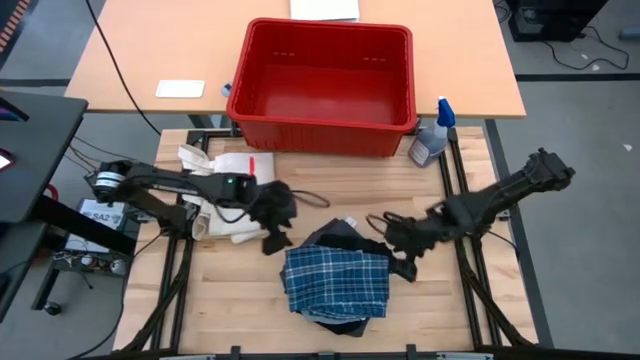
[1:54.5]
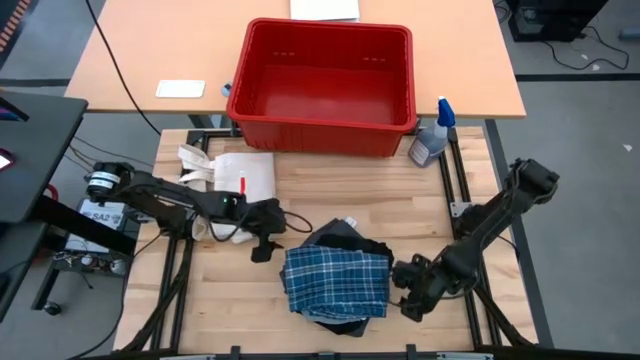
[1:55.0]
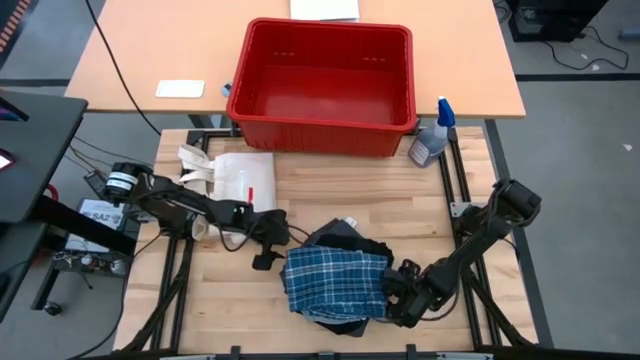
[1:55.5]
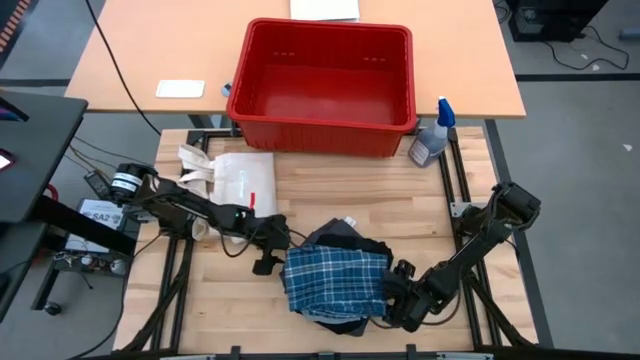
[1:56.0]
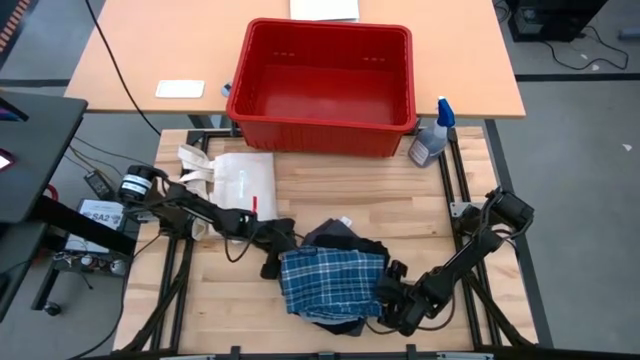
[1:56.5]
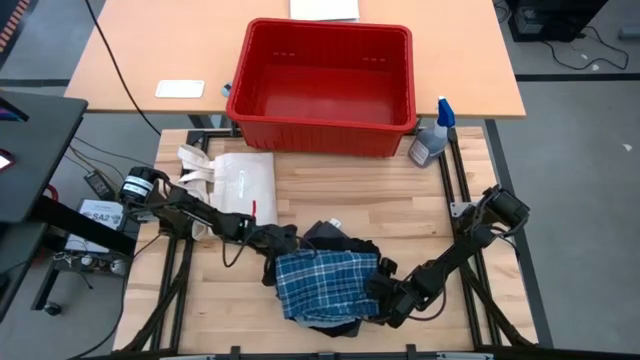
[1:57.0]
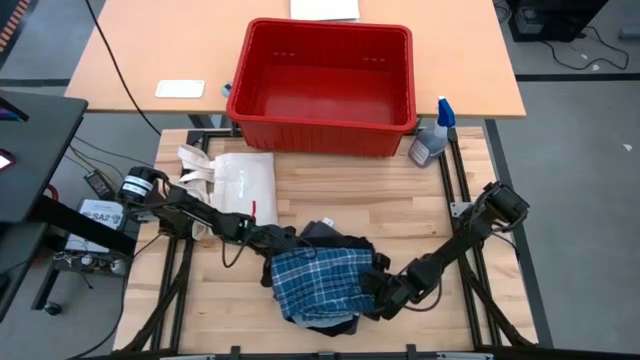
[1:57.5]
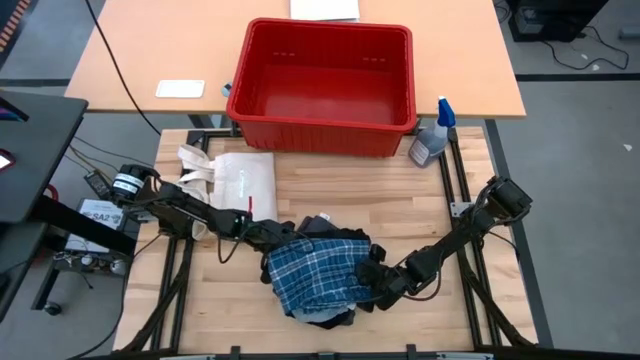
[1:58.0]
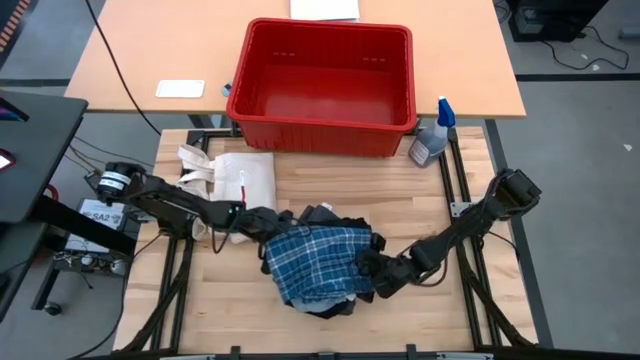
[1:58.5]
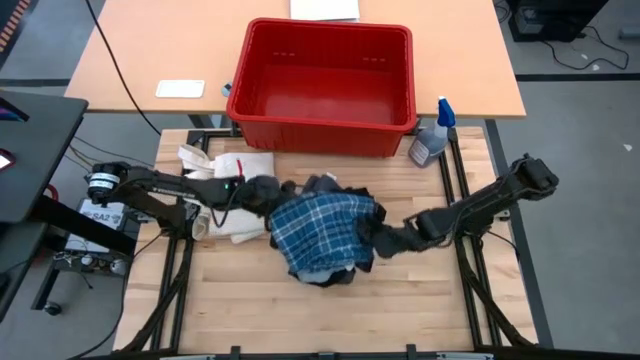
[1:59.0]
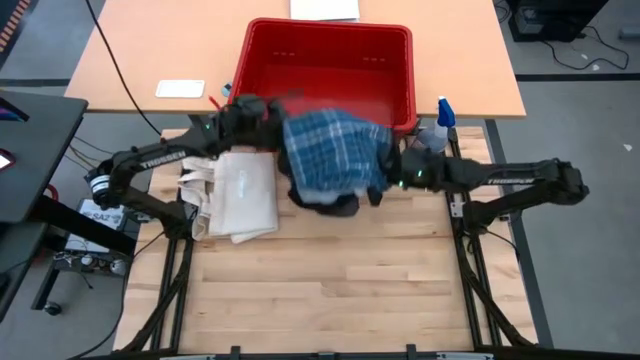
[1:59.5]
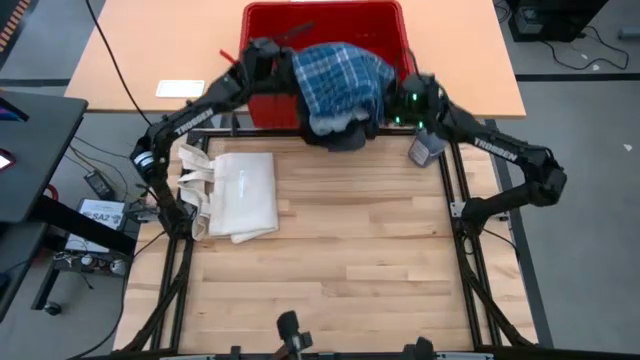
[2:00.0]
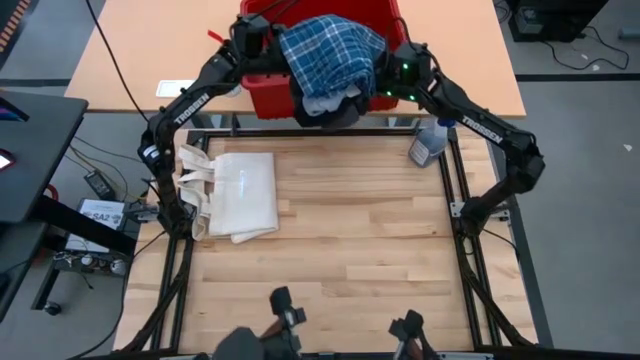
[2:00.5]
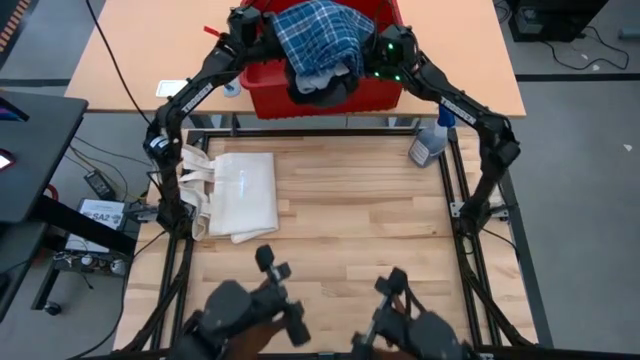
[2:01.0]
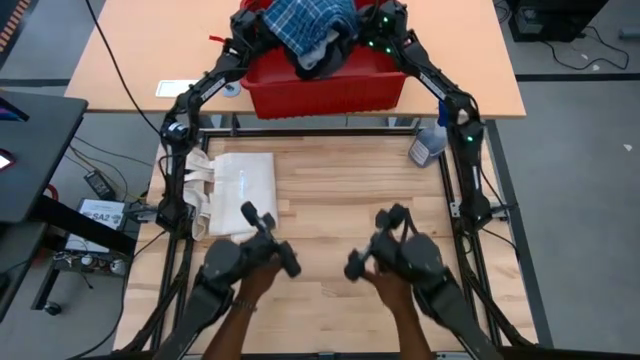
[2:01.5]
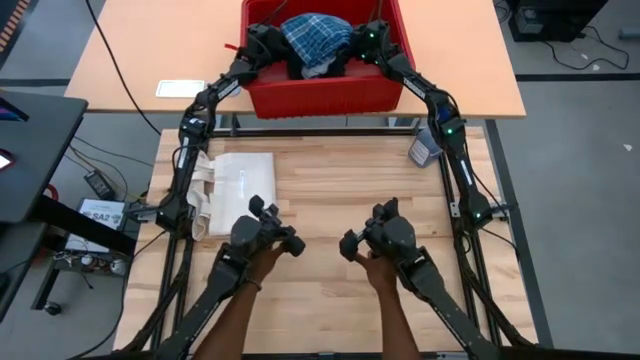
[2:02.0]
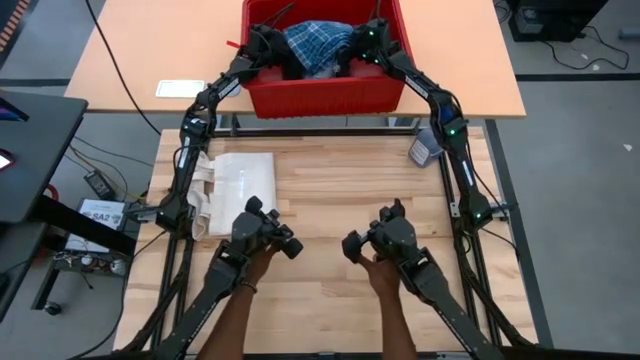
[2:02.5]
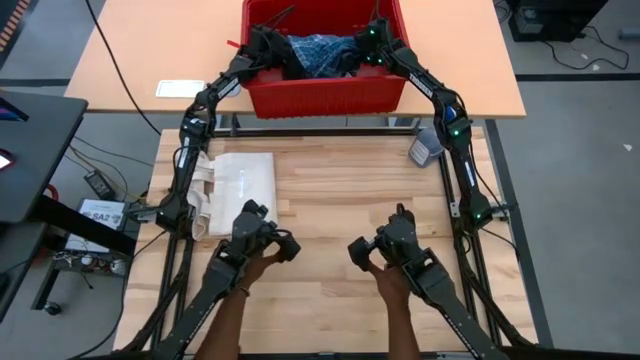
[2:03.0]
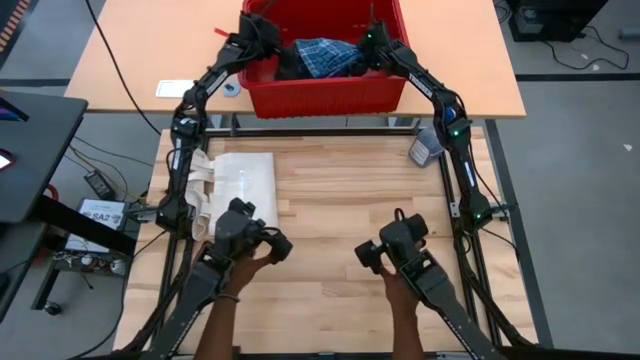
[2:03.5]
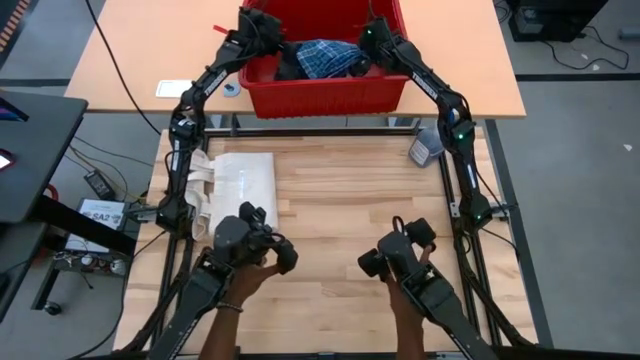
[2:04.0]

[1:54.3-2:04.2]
Task: Sort clothes
Put the stack of clothes into the red bin

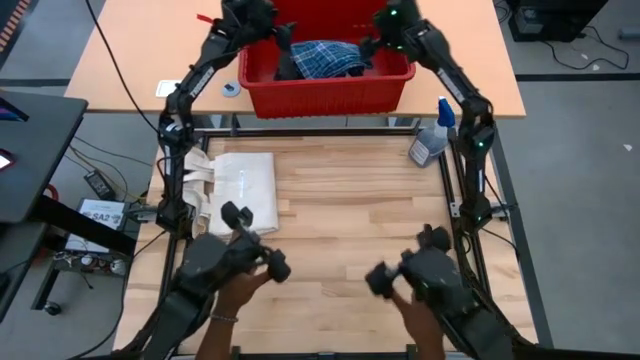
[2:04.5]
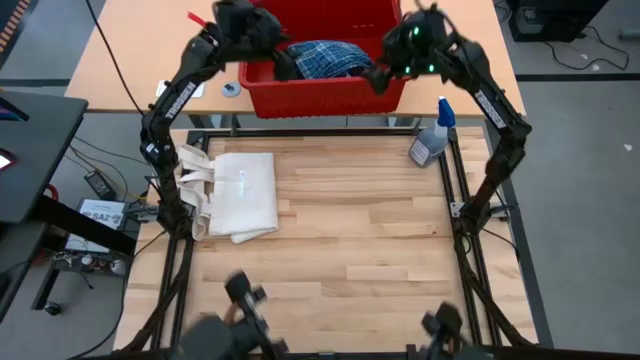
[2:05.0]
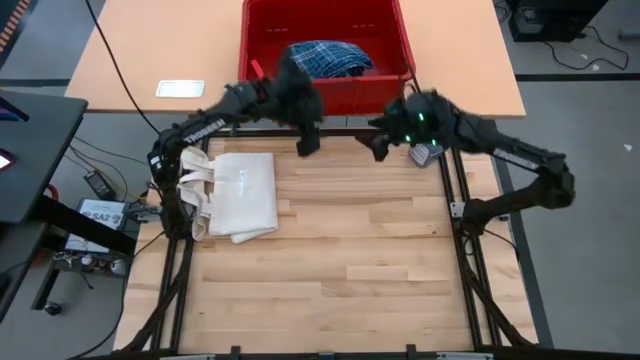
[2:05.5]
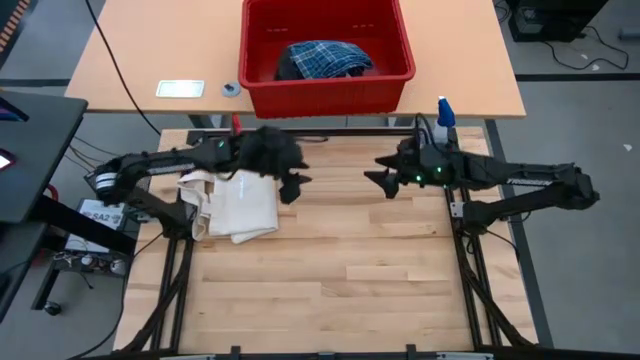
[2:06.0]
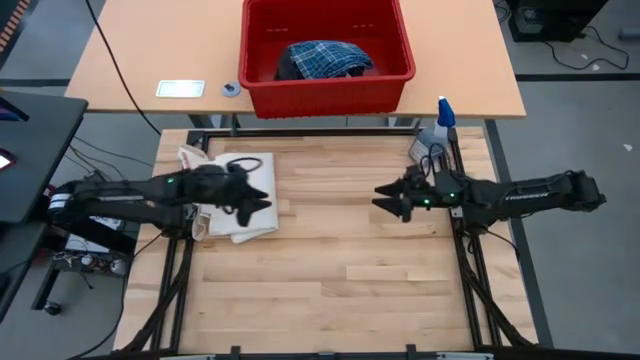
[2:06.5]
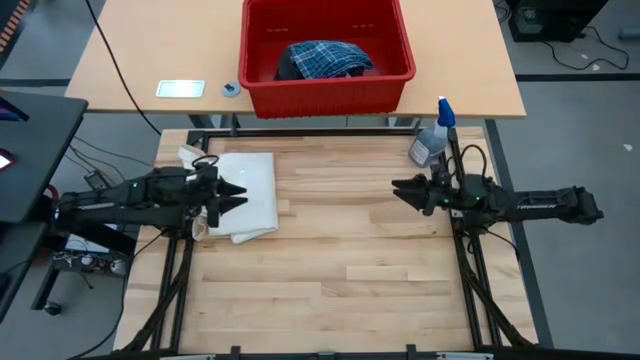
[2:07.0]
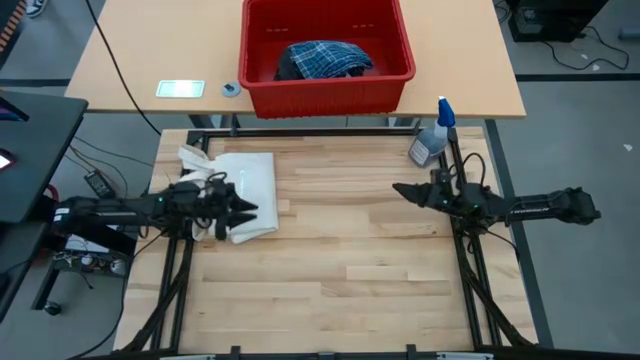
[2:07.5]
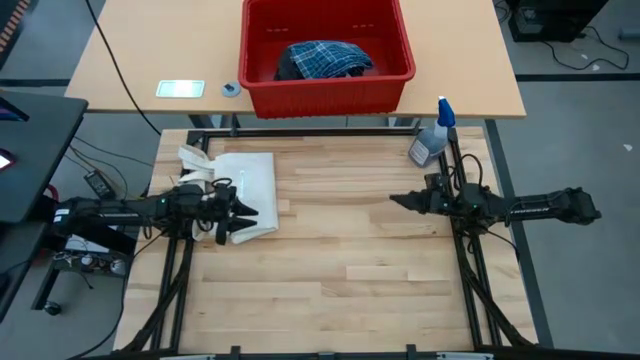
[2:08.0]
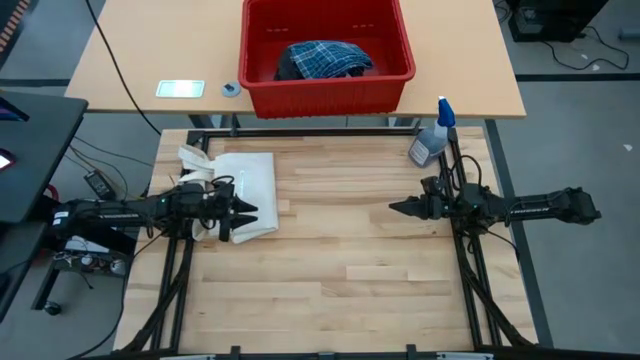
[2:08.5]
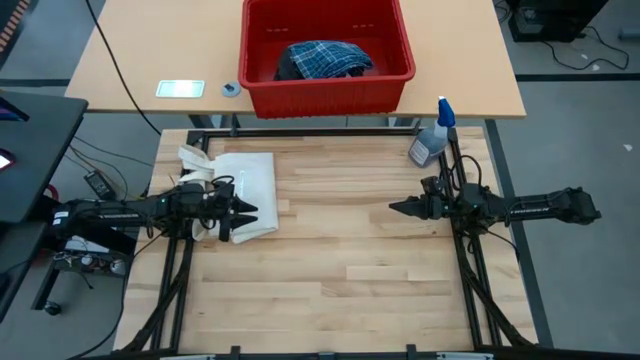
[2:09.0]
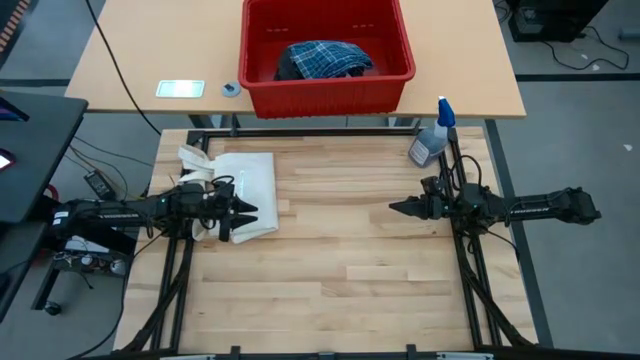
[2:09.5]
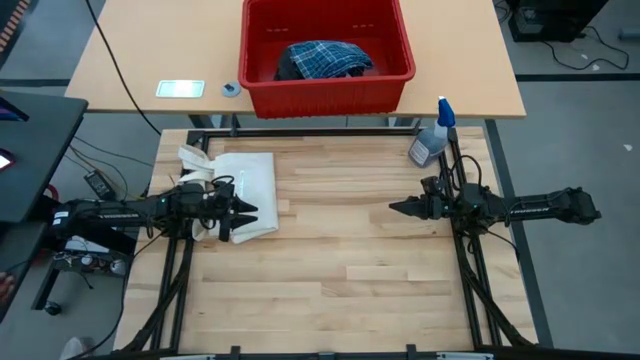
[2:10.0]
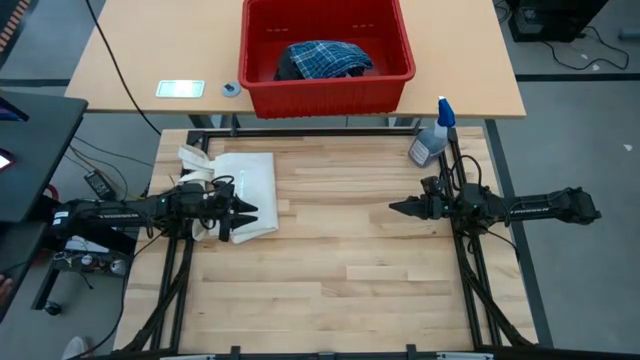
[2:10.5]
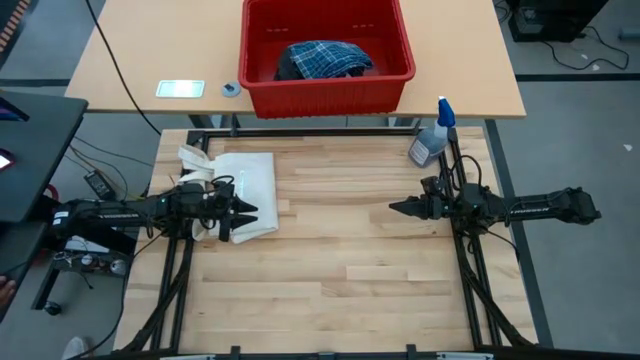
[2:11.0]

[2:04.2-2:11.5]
Return to Home Position

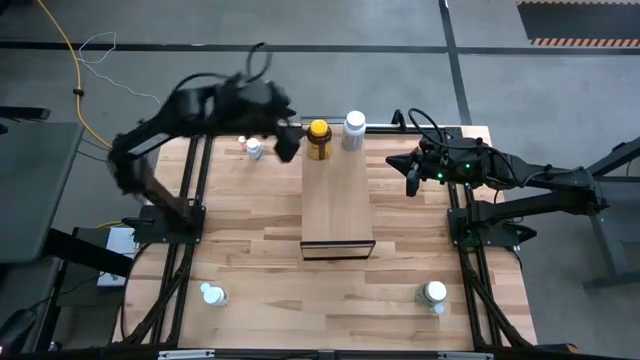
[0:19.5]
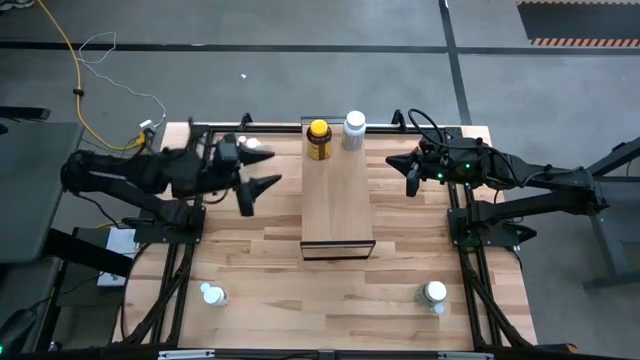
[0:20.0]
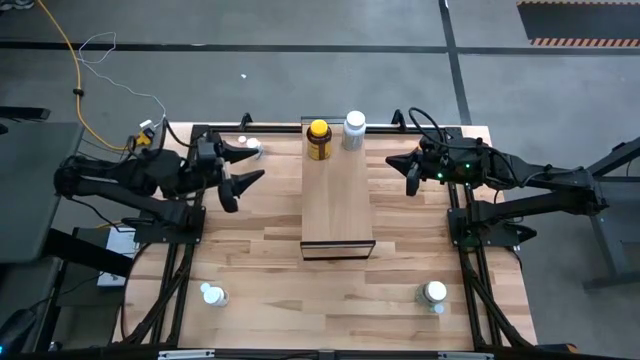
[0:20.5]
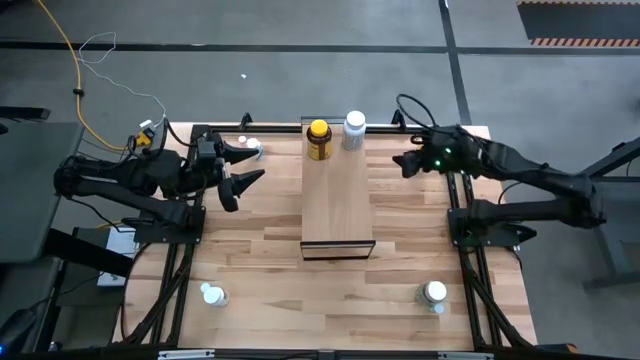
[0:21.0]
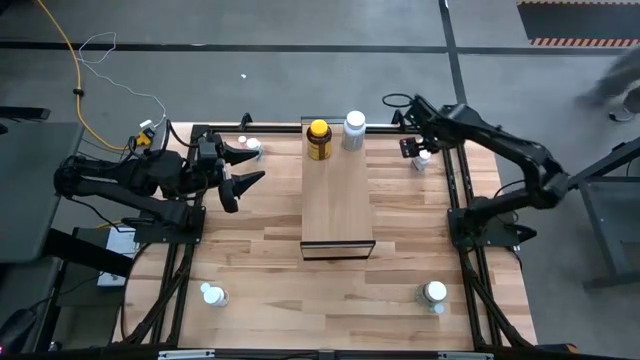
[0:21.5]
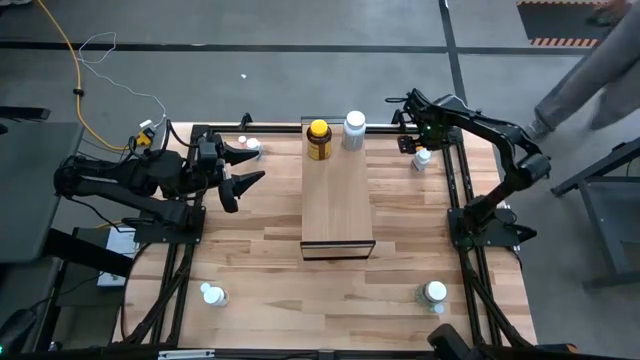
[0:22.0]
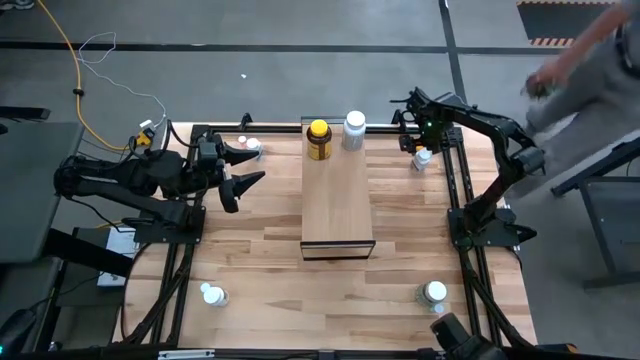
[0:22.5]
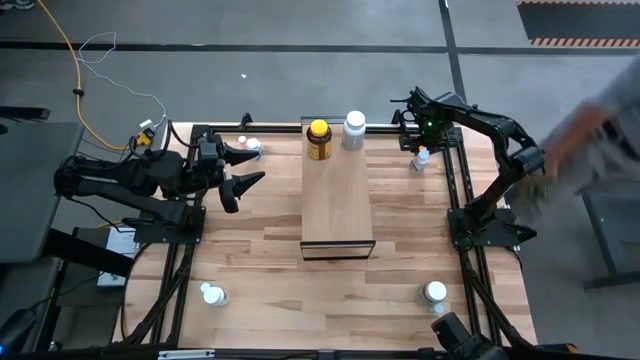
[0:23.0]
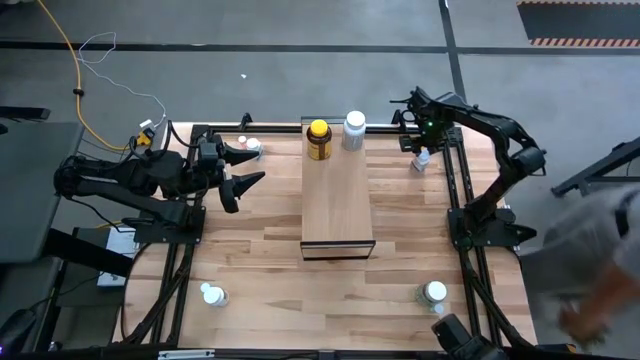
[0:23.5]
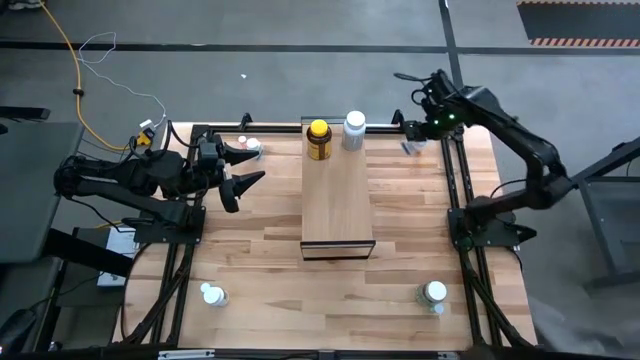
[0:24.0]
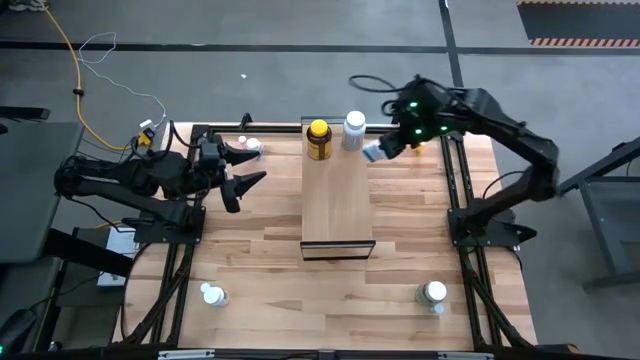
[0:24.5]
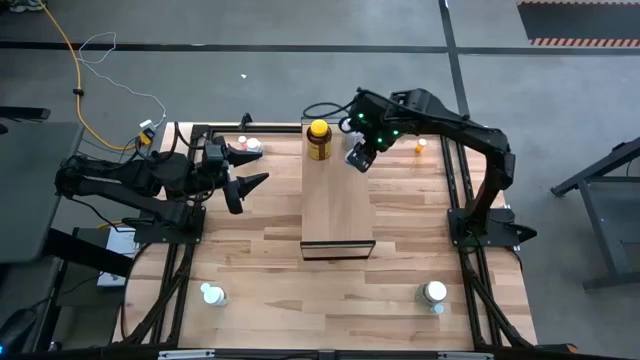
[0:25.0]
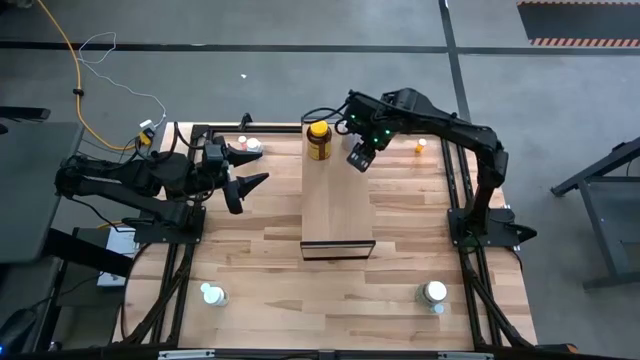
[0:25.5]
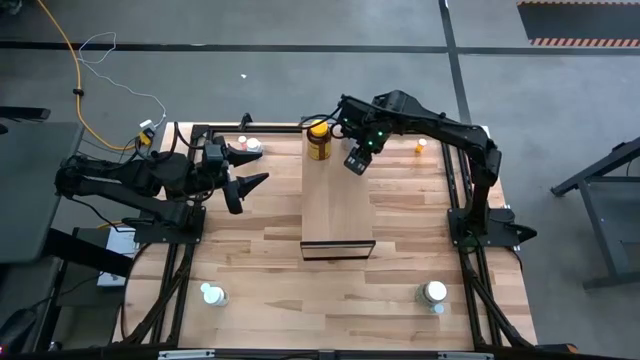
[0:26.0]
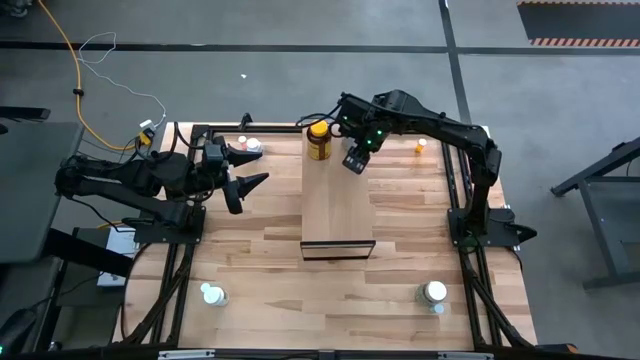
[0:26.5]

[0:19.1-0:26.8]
Task: Pick and place medicine bottles onto shelf by color
Put the right white blue pill bottle on the shelf
